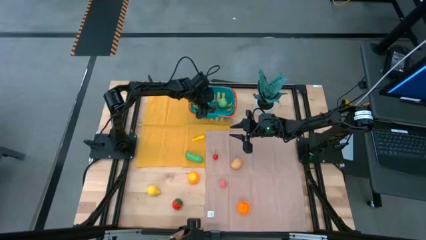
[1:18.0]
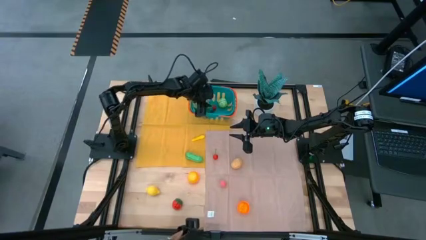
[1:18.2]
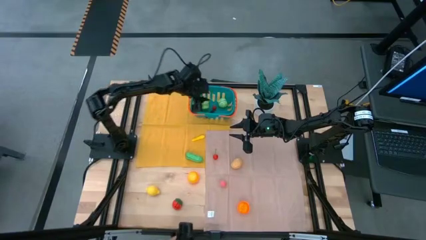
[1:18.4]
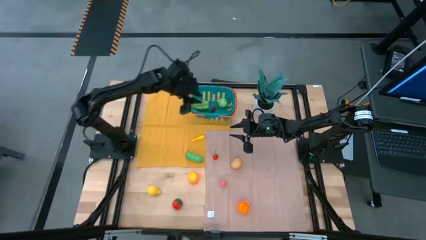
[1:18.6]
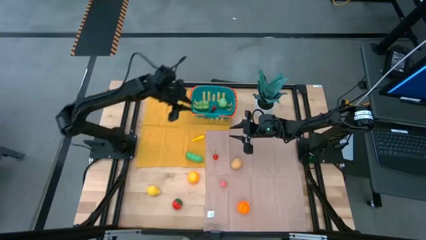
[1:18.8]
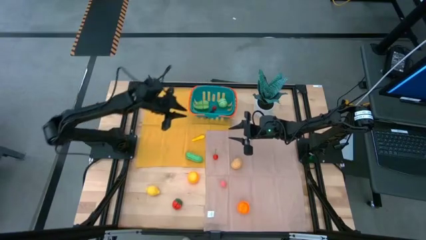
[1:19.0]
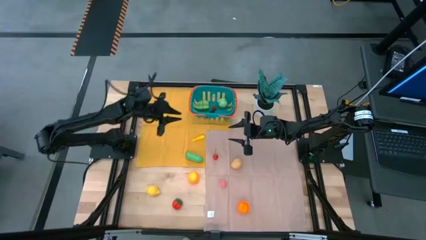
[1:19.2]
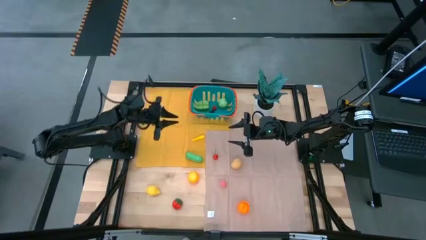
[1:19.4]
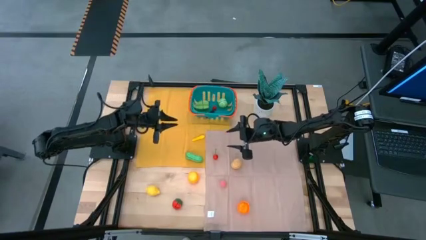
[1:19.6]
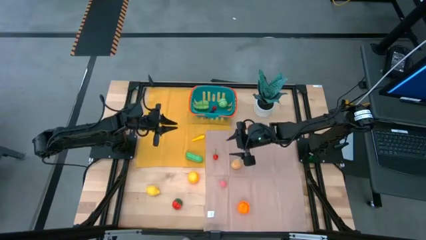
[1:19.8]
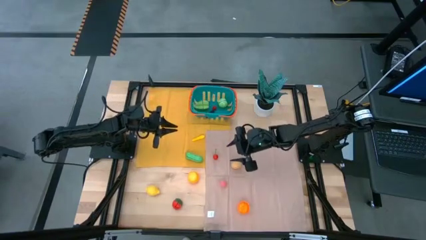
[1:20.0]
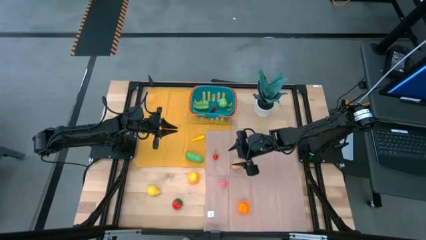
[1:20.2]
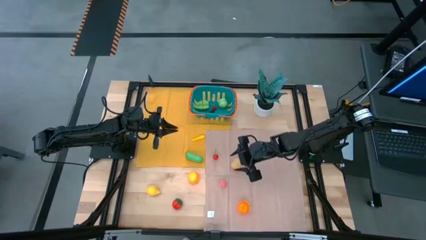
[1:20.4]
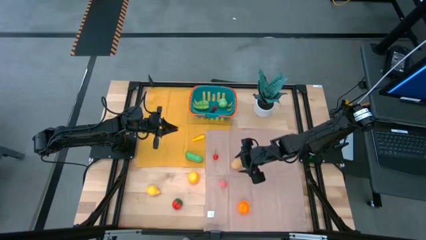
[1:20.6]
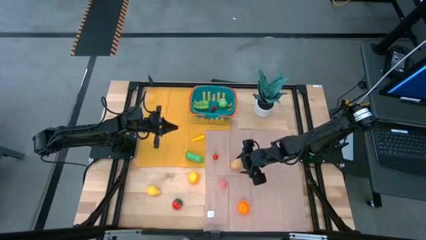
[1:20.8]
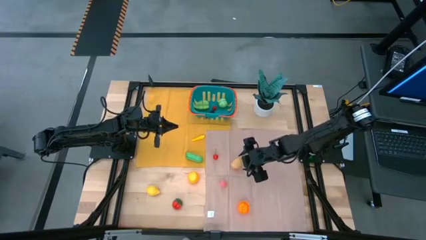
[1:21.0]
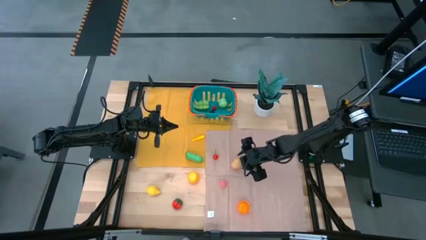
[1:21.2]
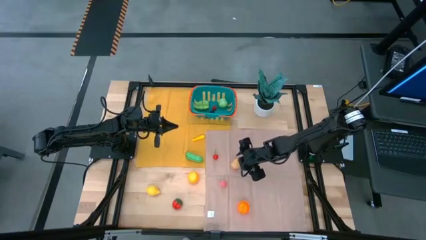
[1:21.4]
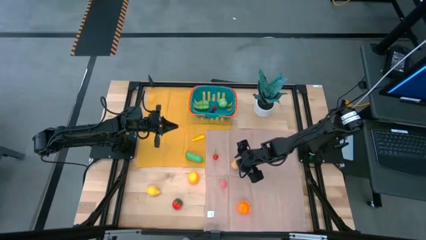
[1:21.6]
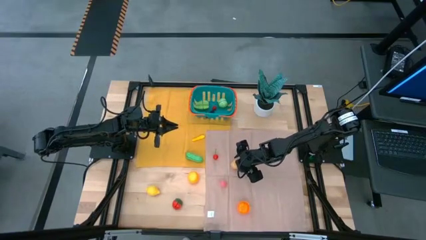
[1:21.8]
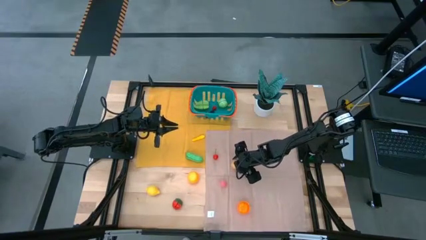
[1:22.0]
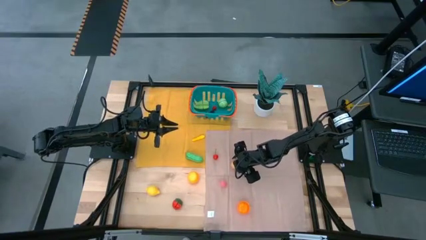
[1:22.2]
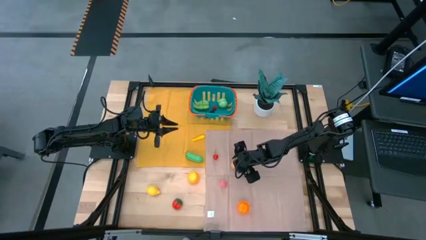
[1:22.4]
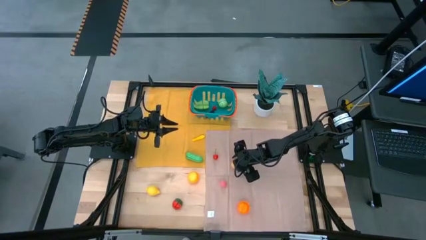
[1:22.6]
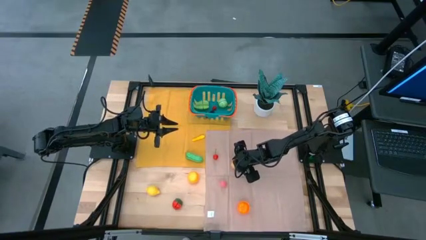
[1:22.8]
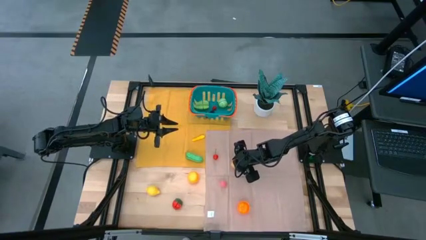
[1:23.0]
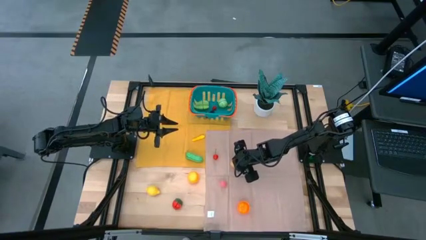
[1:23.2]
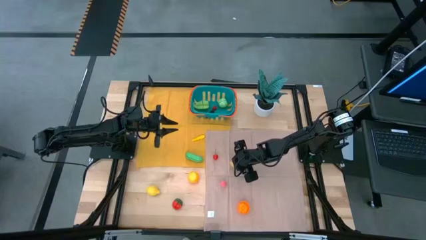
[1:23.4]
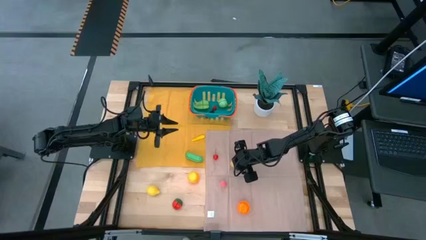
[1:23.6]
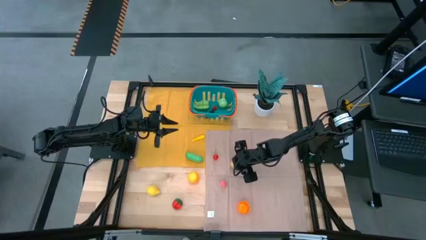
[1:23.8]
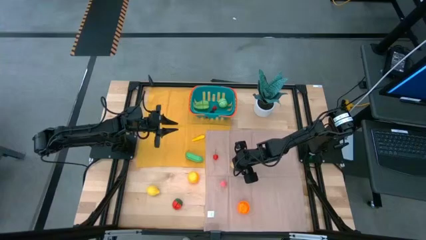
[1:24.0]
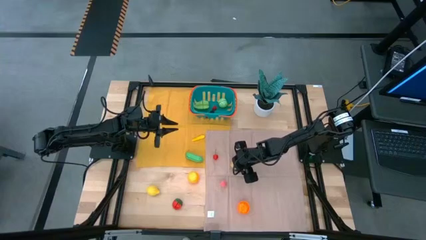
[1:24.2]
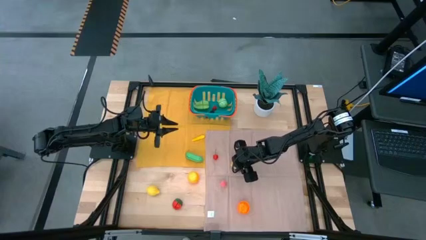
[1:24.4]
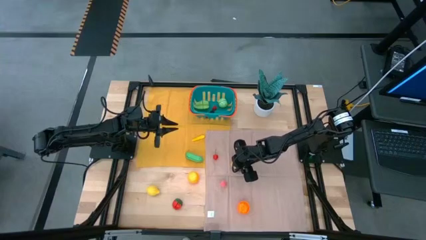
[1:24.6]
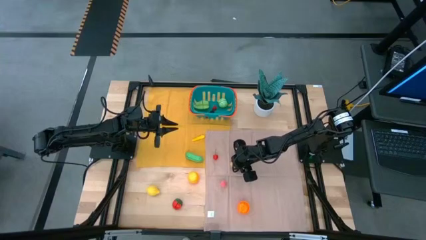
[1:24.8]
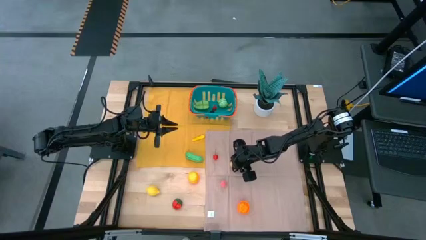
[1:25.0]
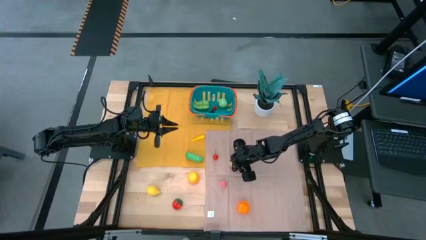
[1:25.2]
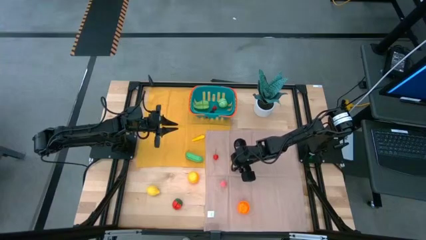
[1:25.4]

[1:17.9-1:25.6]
Task: Pick and placing Produce into tupperware
Put the brown potato into the blue basket

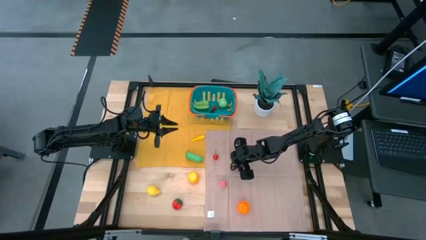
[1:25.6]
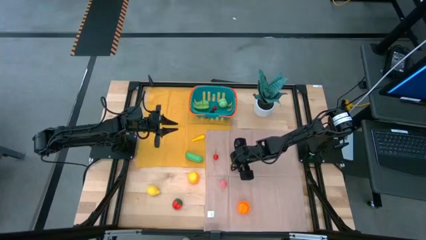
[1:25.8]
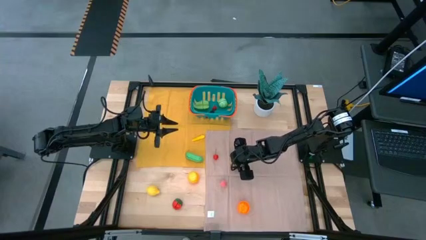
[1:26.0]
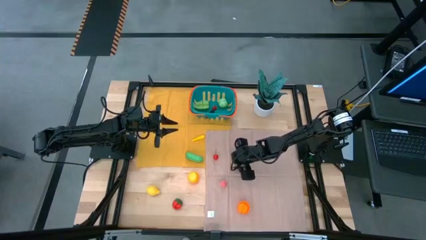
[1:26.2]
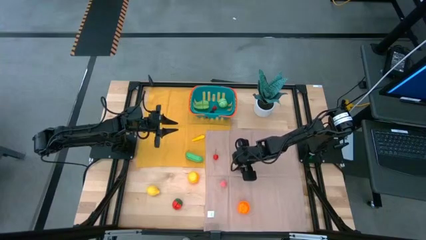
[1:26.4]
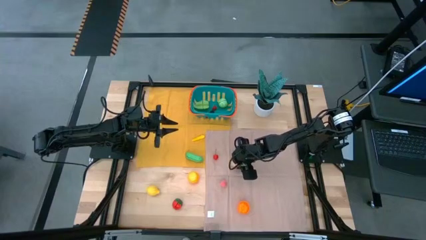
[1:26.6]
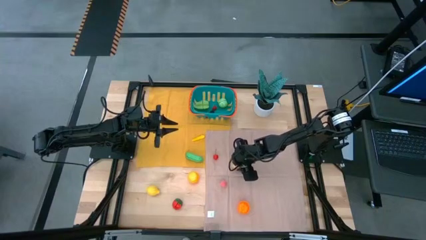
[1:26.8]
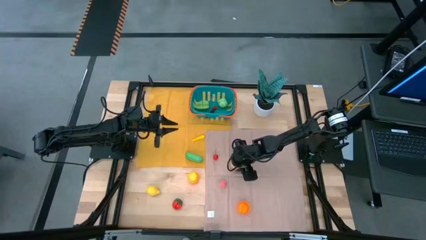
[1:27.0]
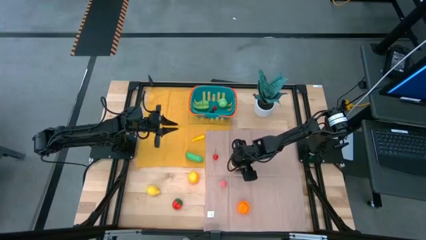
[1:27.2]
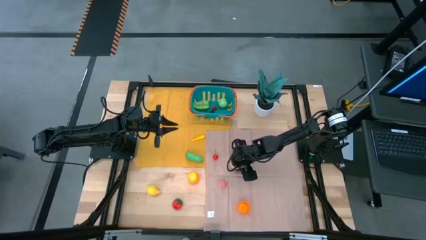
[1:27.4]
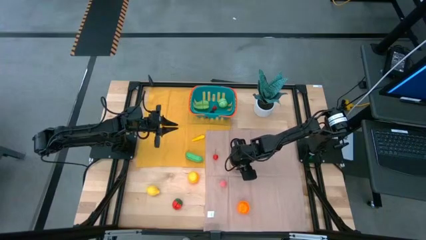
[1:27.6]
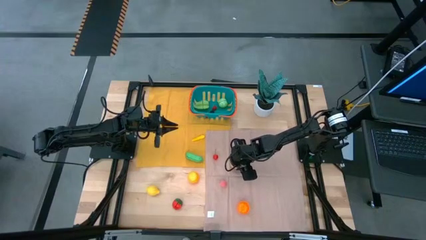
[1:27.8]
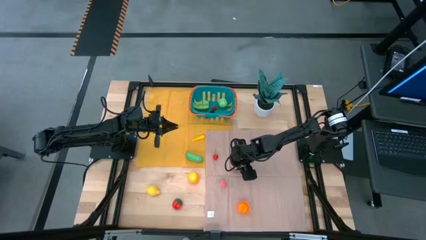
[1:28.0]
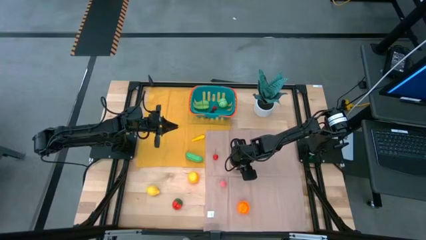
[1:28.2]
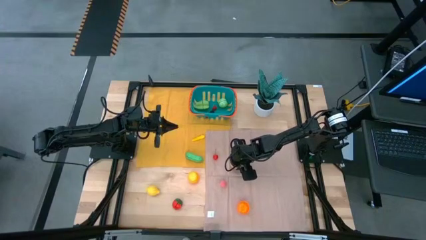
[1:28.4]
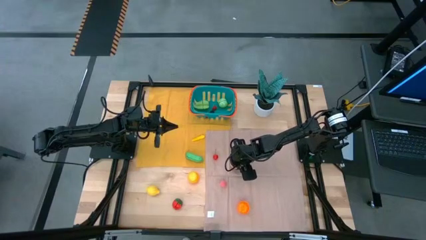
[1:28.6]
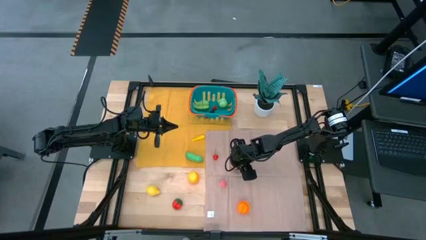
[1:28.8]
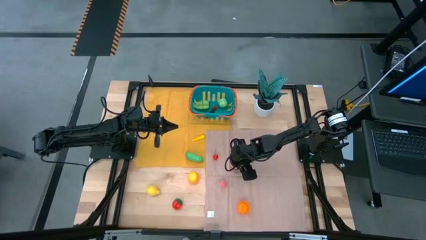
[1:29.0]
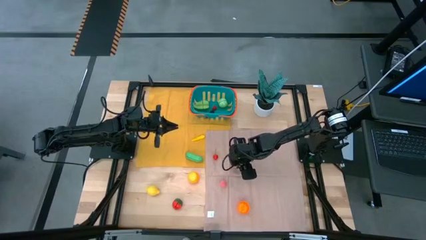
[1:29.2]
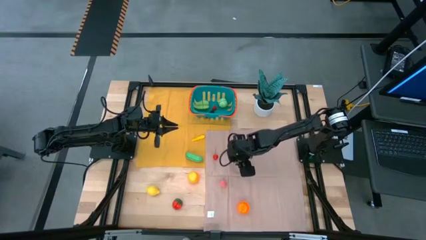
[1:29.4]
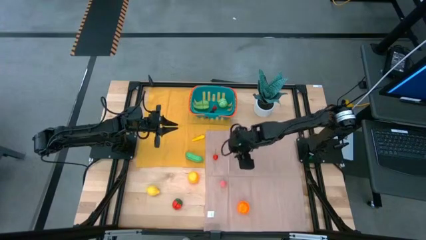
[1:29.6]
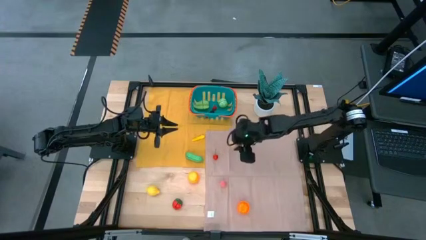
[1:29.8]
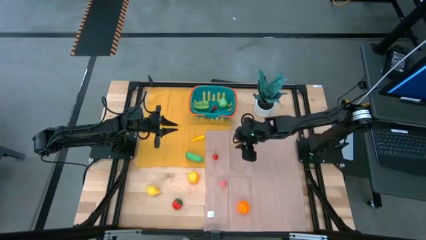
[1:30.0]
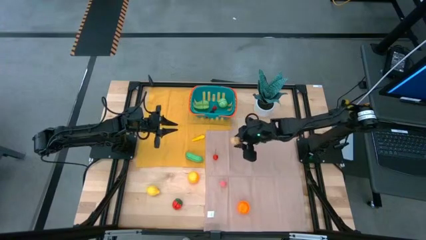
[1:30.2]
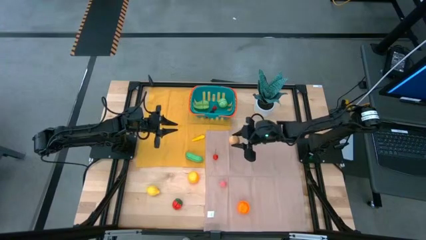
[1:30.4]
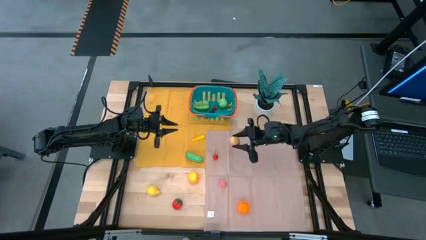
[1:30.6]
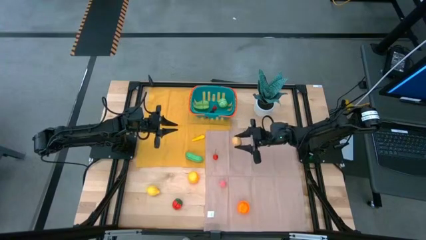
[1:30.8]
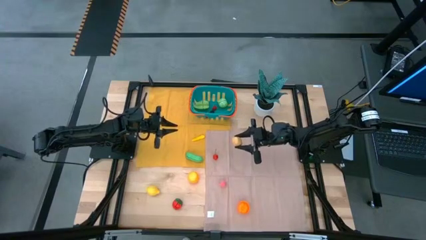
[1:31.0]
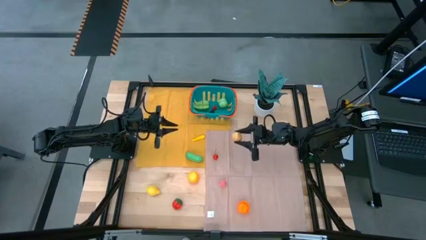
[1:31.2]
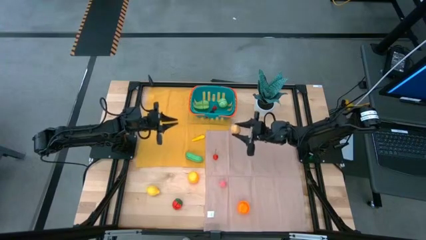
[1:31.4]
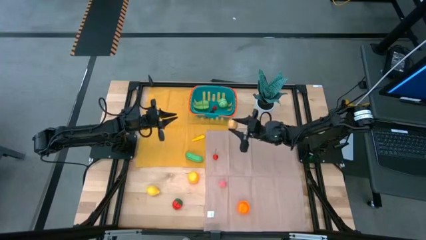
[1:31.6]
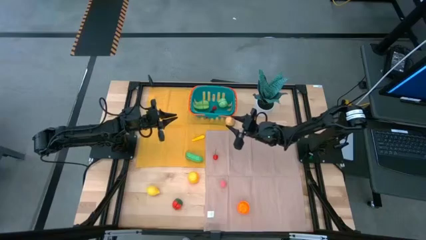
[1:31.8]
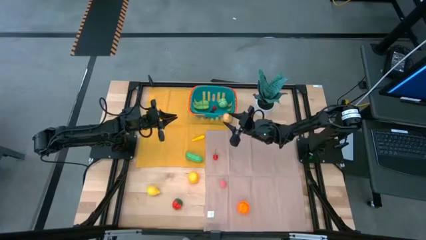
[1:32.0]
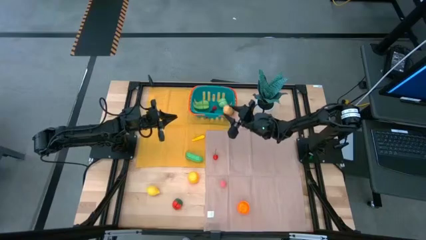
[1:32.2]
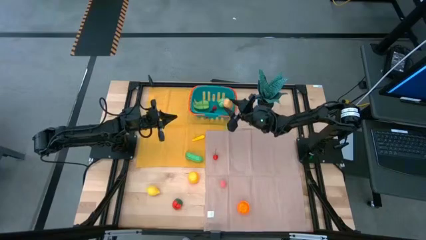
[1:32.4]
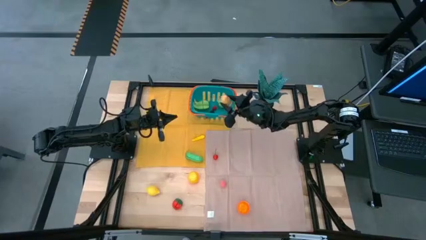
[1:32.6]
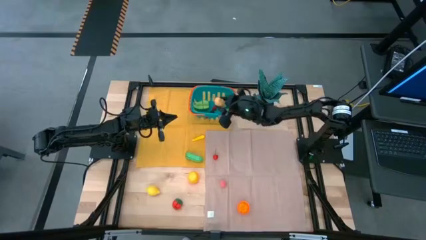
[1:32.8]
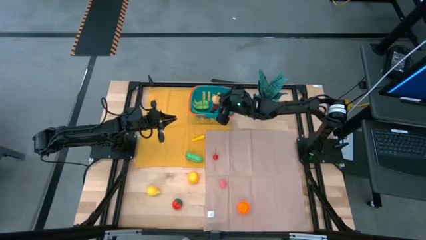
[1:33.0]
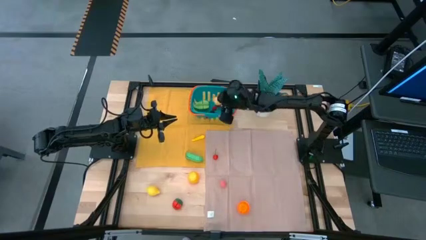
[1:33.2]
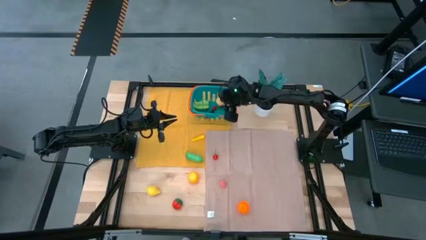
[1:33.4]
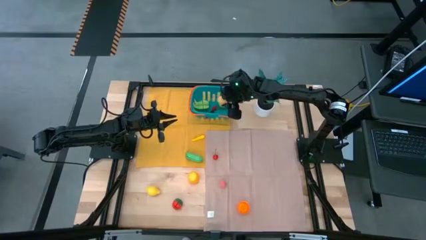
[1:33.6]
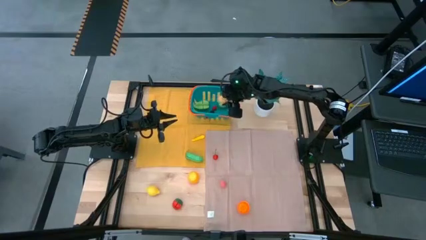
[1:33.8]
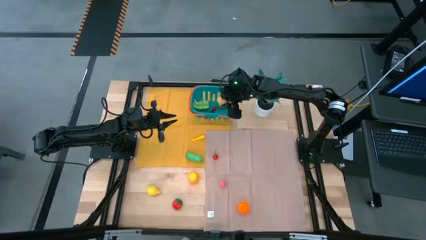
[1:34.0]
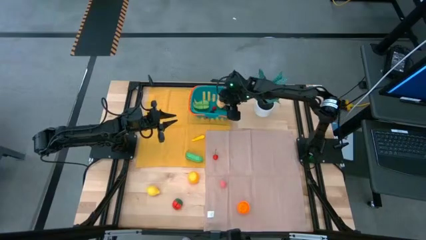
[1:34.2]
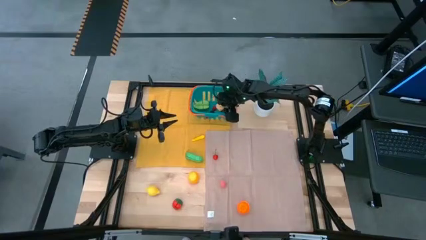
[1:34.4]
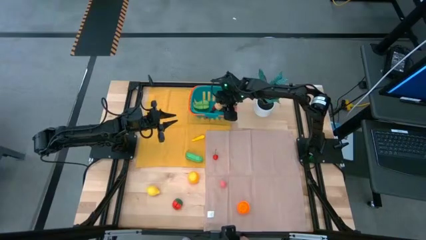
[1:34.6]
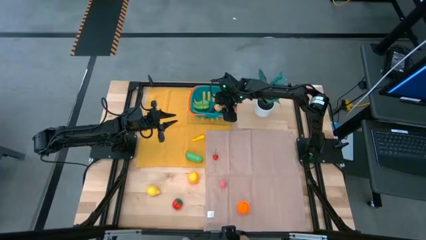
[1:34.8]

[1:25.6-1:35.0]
Put the brown potato into the blue basket
